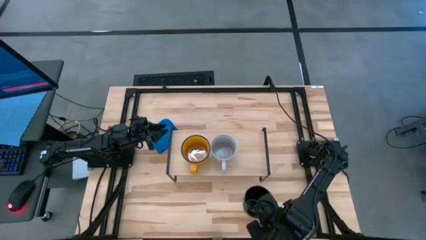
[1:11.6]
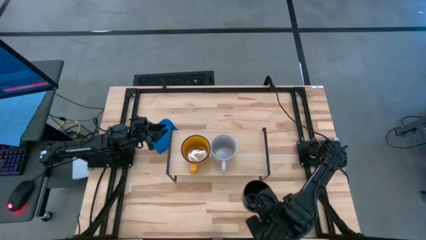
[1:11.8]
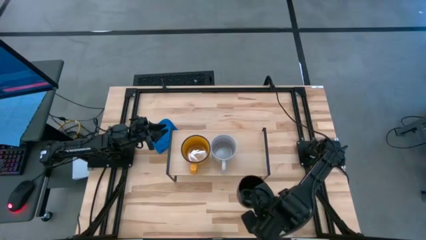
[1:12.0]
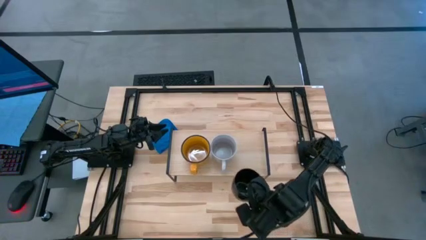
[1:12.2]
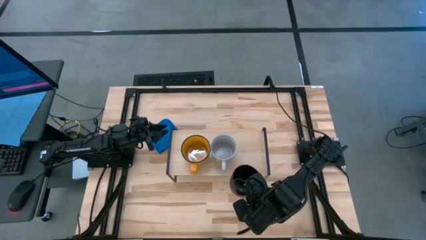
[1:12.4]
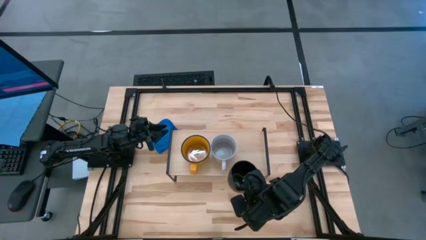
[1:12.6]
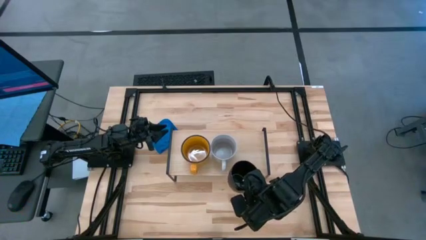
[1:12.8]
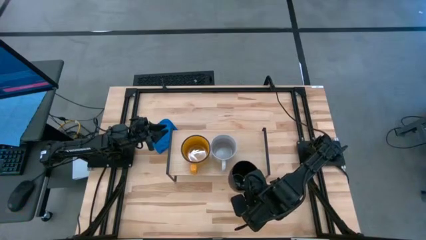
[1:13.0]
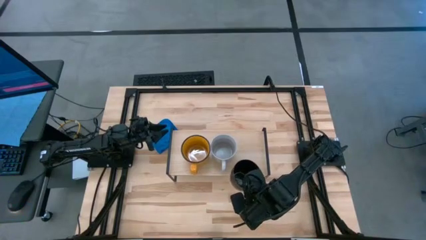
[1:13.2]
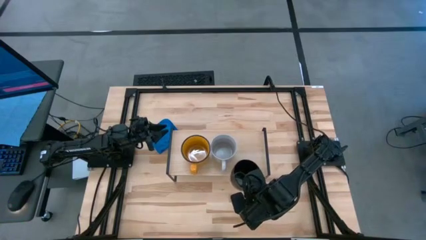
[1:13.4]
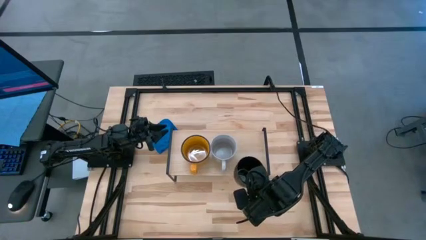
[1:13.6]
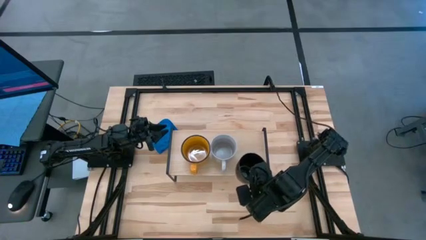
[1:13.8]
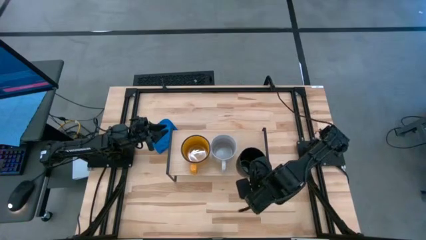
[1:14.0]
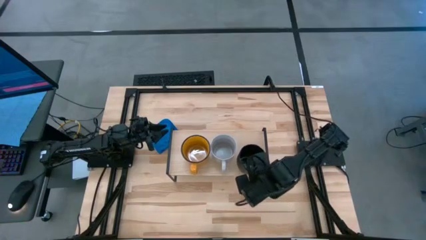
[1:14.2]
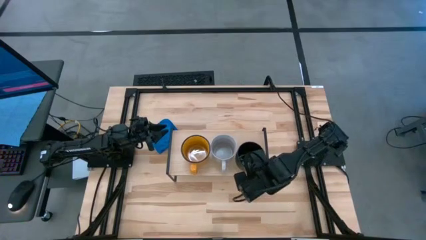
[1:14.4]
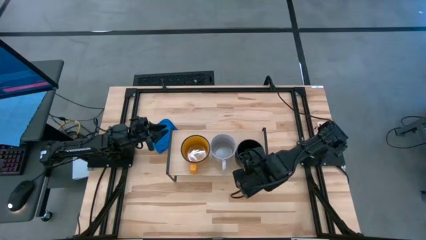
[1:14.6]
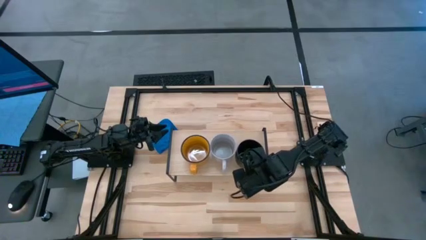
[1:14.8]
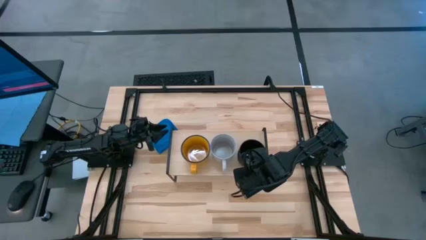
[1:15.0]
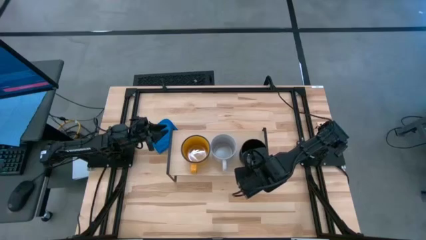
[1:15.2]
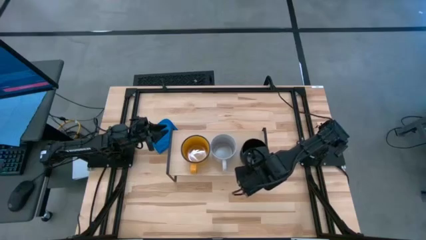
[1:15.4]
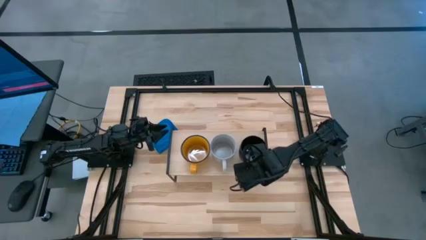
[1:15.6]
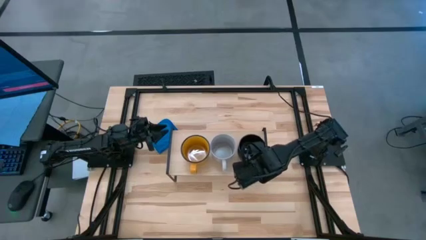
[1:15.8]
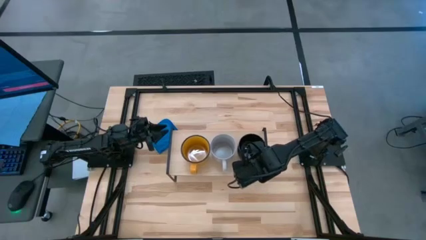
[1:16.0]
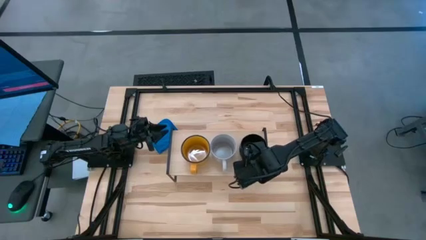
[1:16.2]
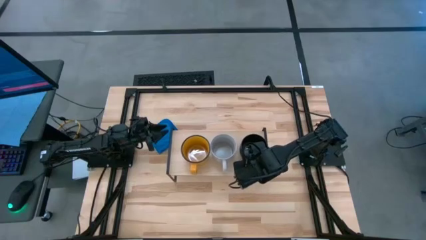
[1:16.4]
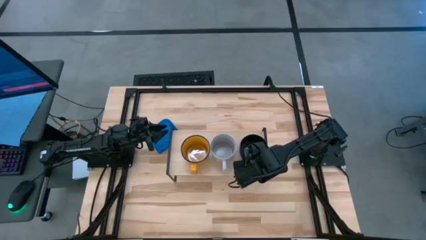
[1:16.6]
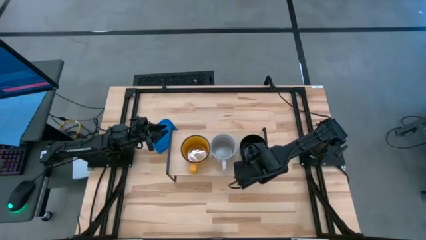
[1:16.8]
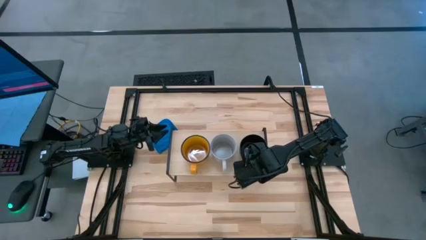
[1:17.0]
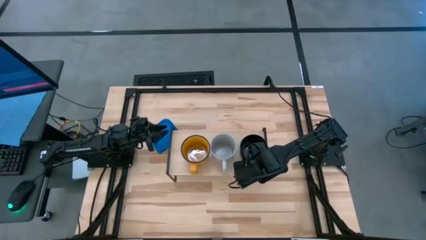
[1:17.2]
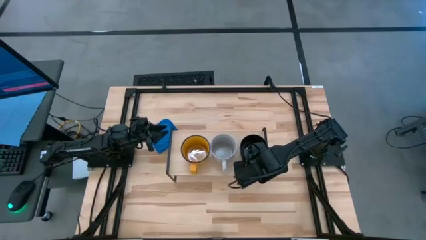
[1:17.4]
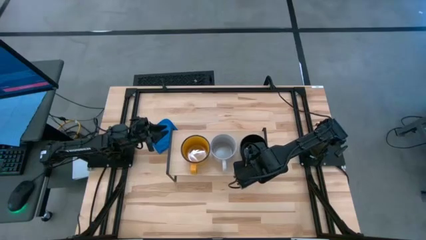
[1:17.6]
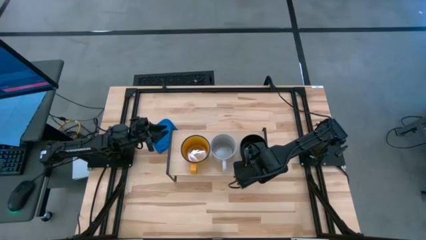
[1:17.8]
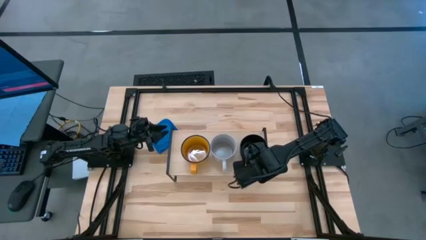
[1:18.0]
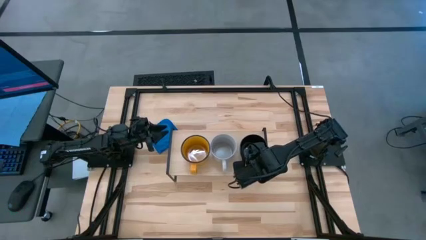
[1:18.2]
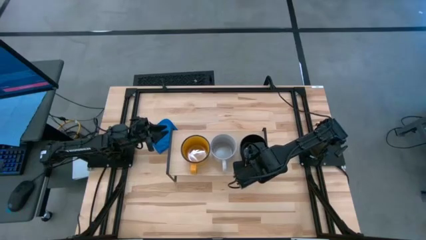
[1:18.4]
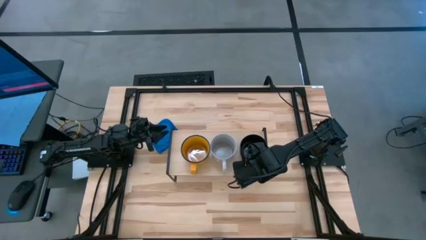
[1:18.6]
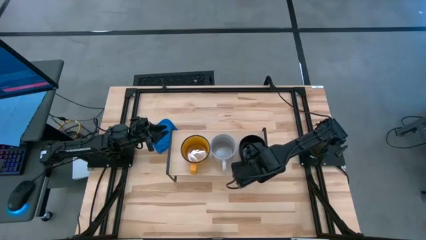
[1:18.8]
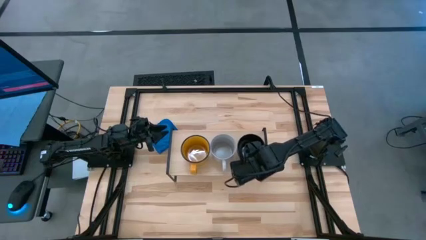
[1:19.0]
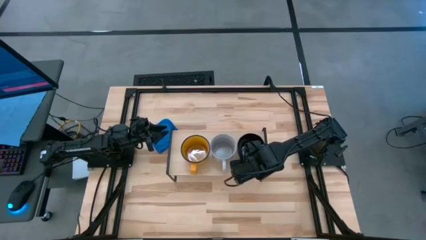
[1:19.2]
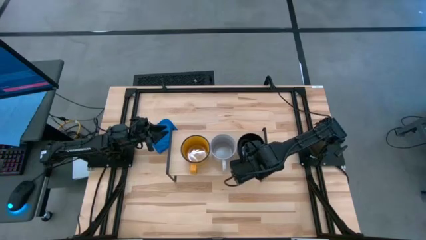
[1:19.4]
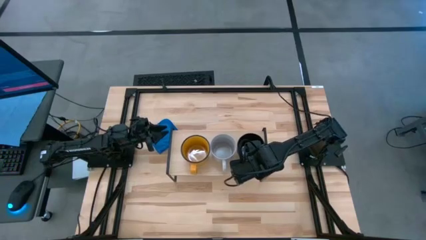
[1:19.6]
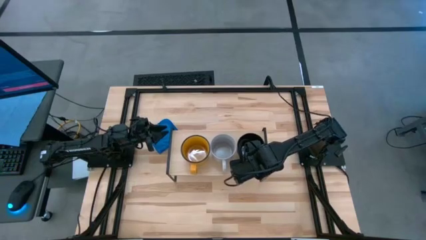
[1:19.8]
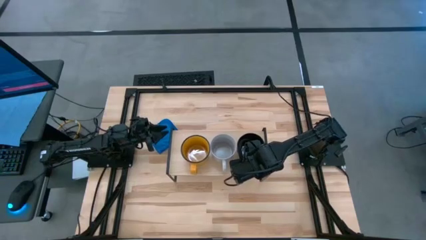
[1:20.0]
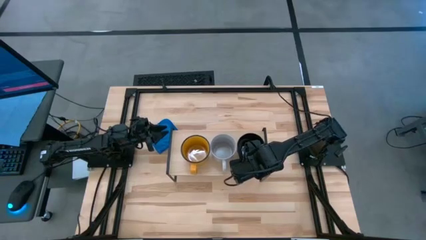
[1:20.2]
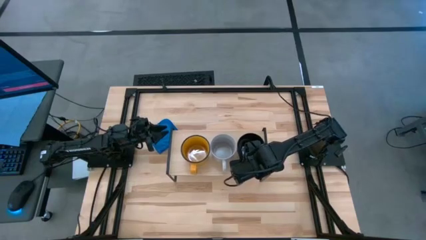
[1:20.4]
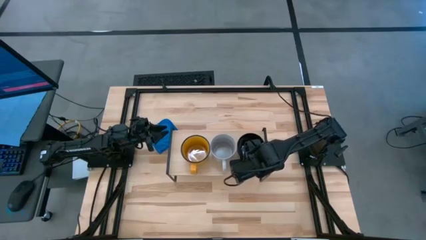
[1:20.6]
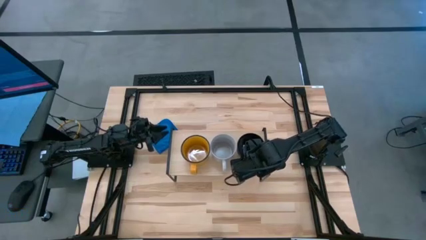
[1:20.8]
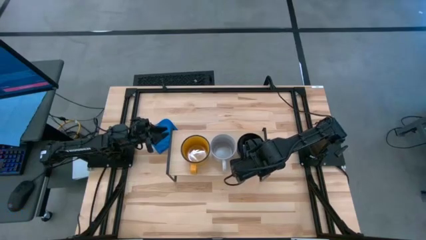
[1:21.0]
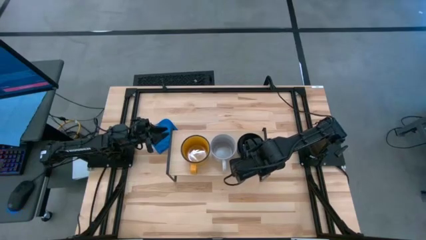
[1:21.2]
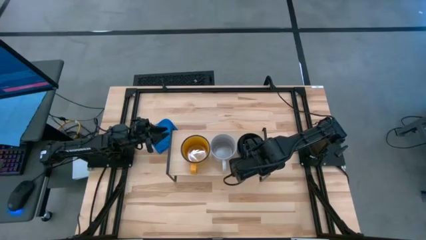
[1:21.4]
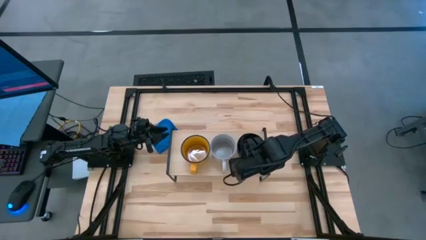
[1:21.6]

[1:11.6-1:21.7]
Task: Stack small to large cups/mugs on shelf
Put the black cup on the shelf

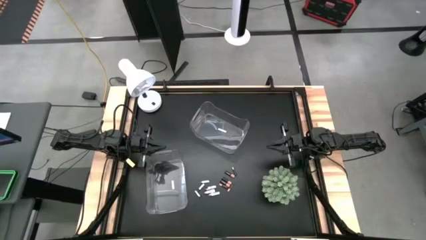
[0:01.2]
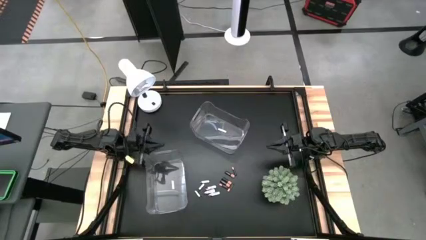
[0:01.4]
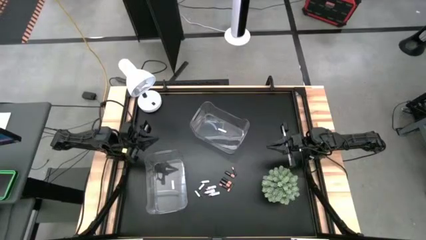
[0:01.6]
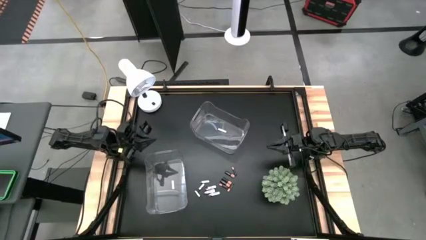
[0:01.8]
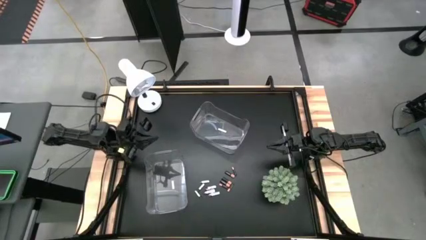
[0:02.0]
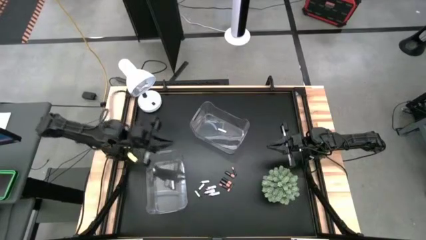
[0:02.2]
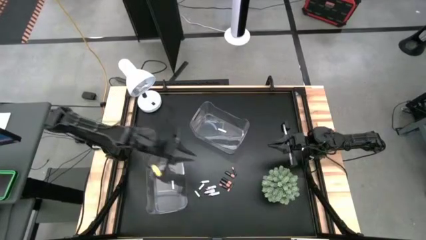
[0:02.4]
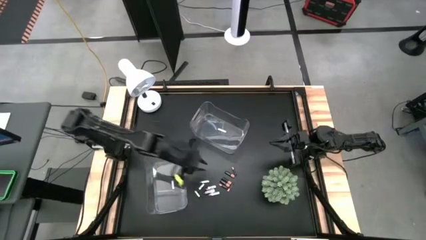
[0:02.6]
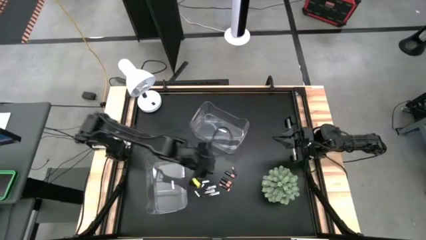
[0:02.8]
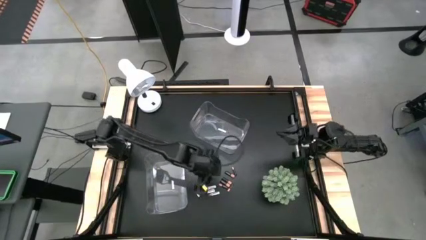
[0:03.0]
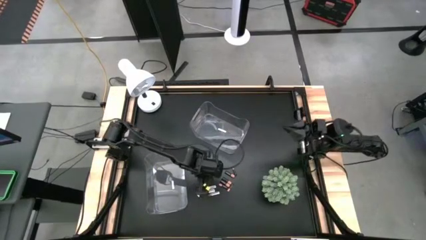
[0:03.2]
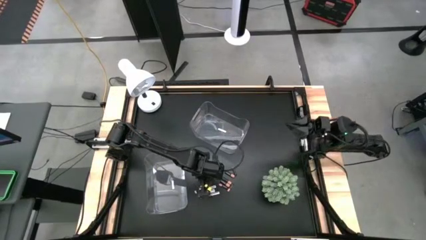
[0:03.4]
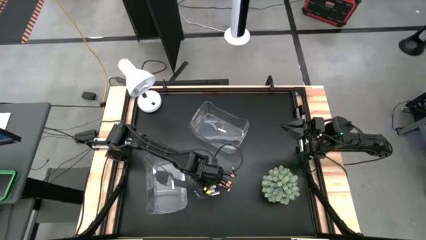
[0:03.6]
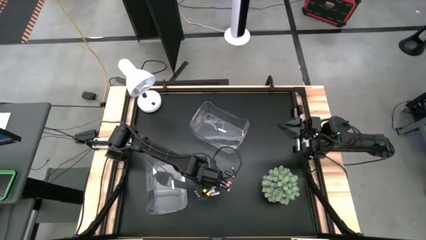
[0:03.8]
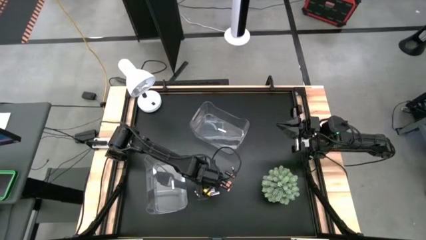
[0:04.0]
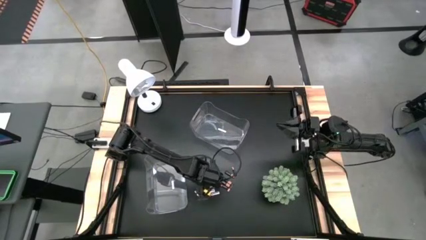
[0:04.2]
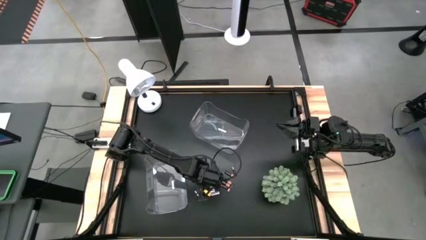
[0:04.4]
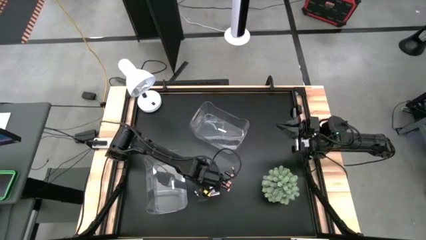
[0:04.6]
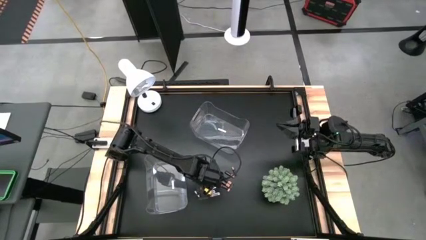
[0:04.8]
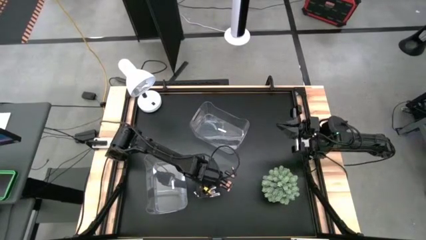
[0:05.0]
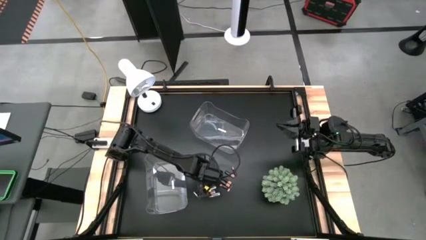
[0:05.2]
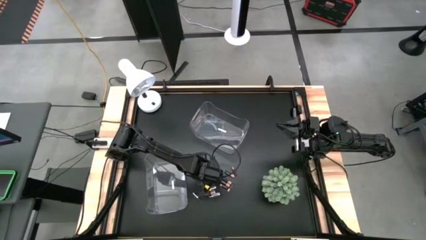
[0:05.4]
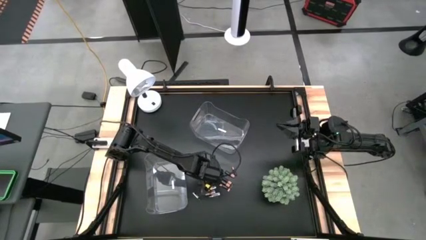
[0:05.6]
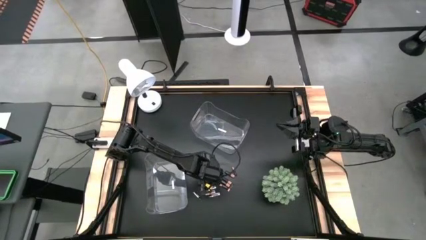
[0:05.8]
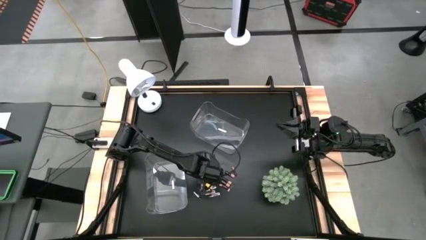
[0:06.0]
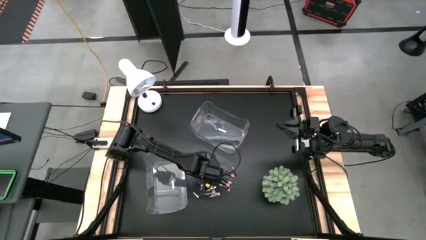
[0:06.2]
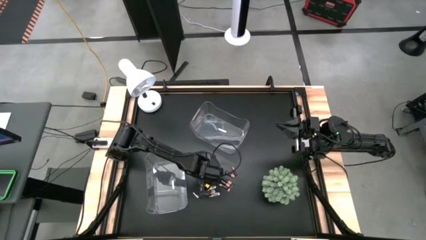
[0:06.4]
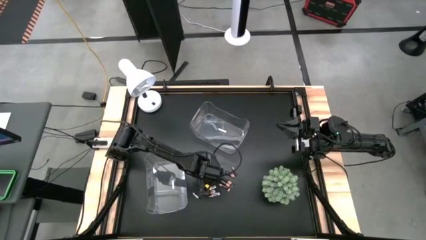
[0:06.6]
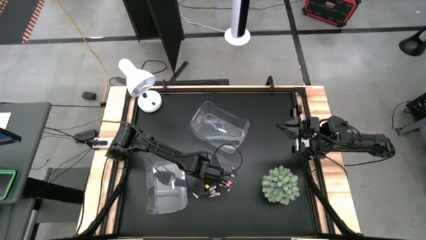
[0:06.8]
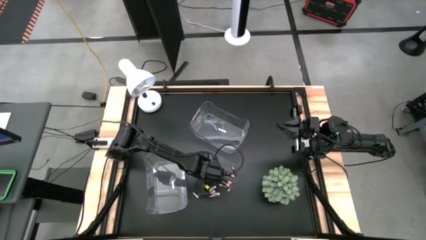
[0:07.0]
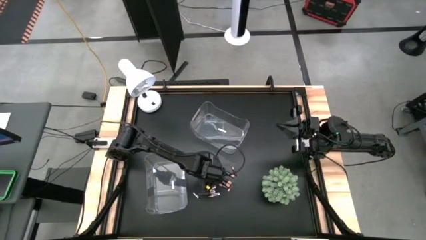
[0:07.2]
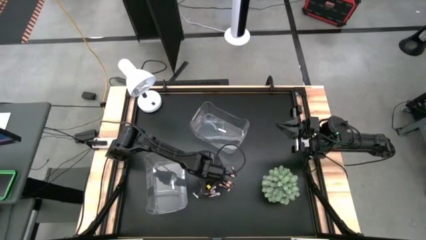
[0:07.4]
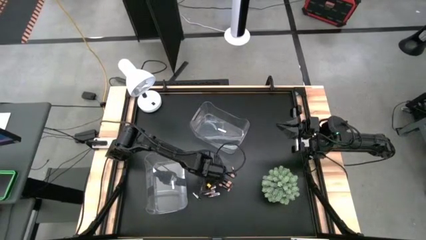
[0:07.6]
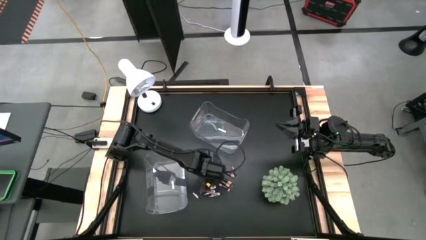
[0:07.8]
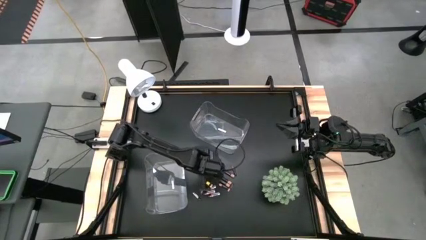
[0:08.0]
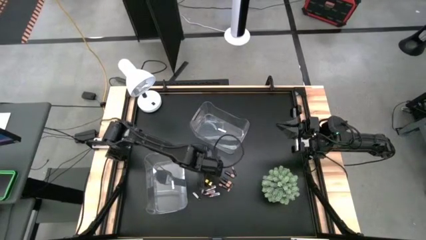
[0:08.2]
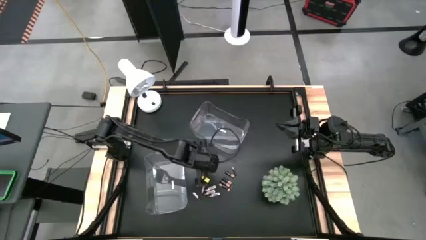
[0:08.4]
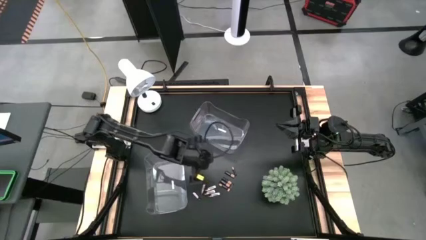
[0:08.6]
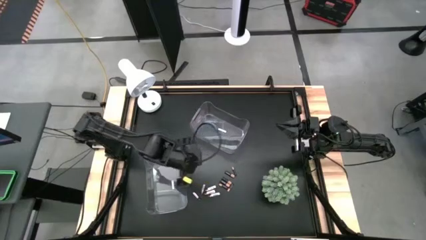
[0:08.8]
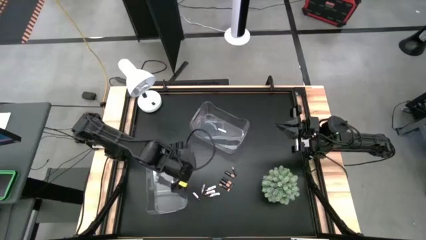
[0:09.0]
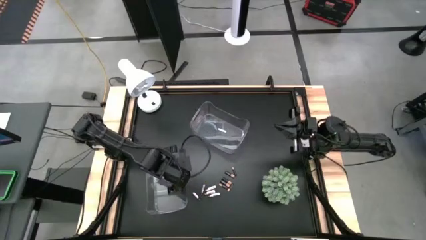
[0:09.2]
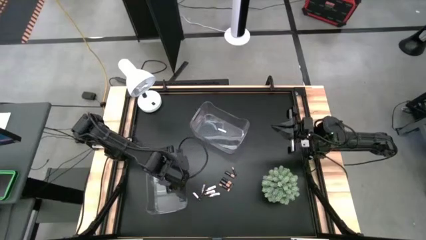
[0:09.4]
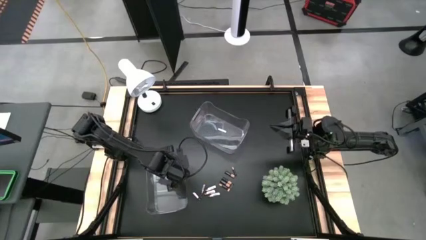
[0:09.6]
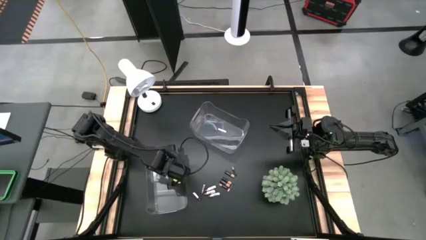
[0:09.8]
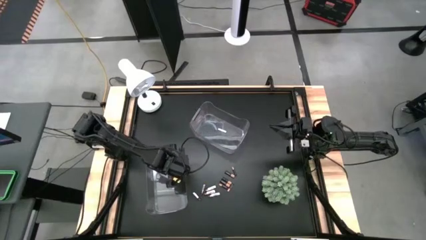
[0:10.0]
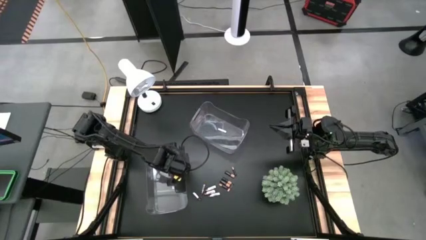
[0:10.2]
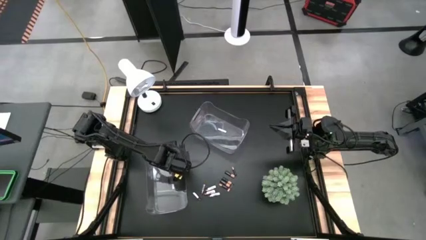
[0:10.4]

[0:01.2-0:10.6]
Task: Sort batteries
Put the silver battery into the bottom transparent bin
